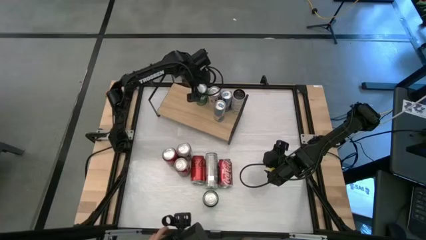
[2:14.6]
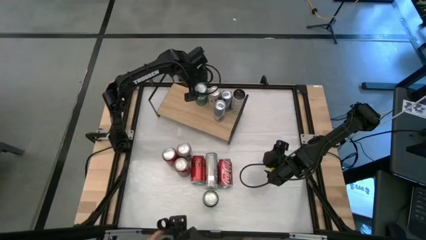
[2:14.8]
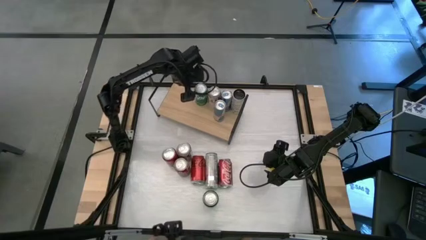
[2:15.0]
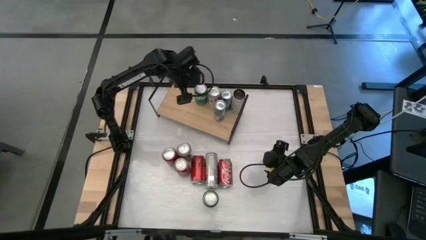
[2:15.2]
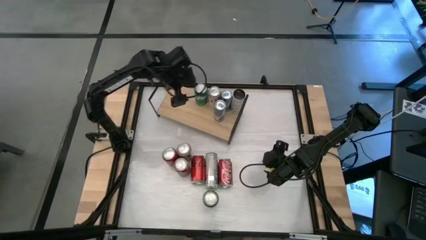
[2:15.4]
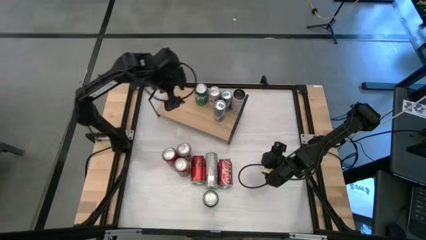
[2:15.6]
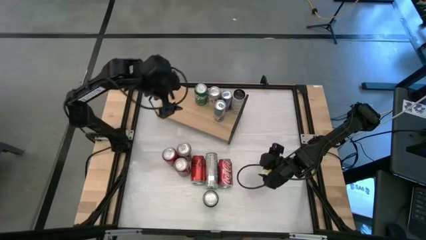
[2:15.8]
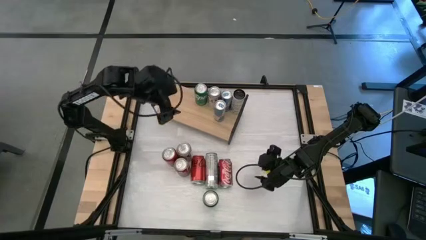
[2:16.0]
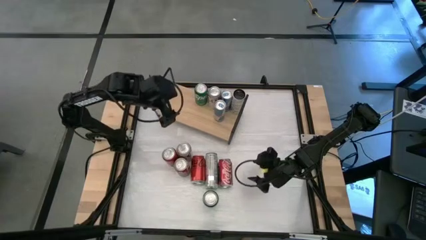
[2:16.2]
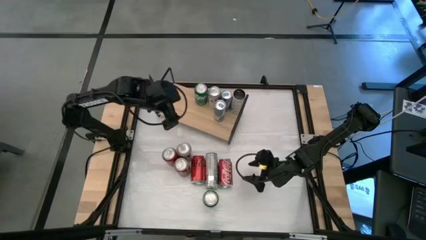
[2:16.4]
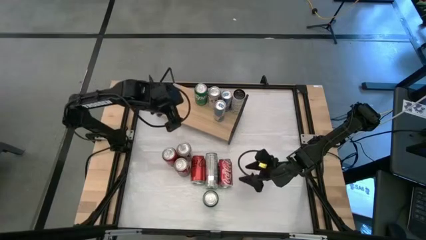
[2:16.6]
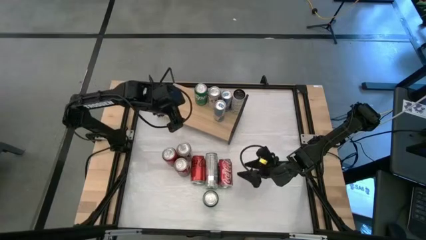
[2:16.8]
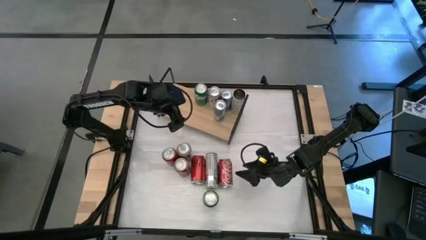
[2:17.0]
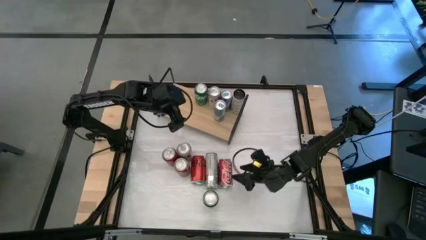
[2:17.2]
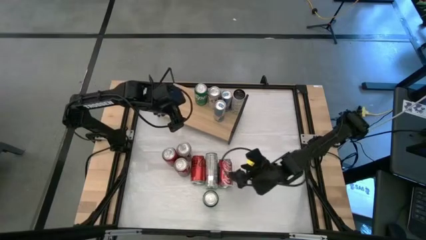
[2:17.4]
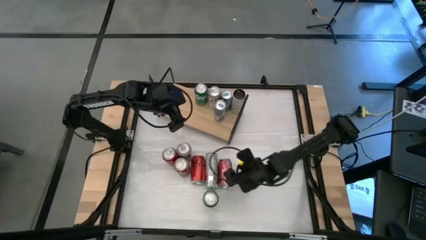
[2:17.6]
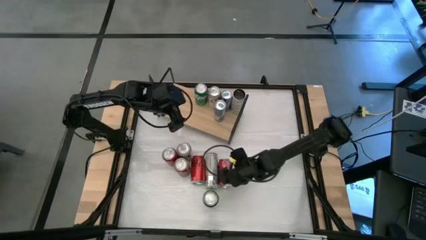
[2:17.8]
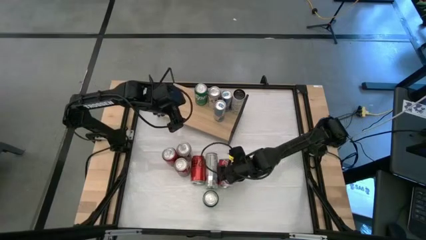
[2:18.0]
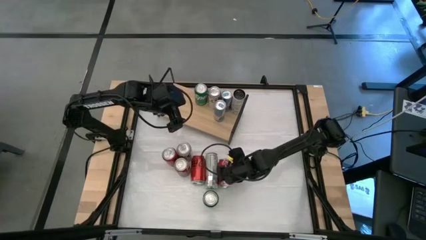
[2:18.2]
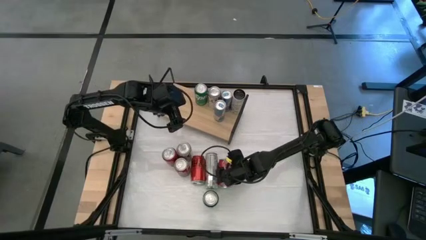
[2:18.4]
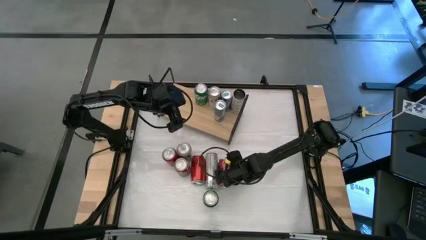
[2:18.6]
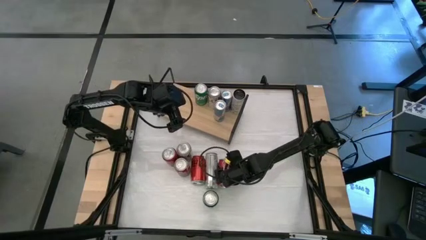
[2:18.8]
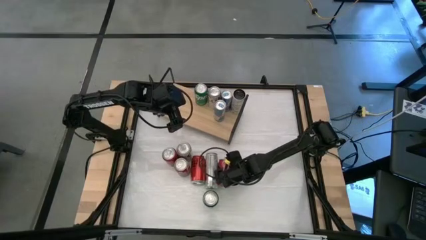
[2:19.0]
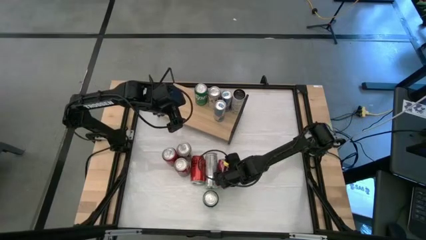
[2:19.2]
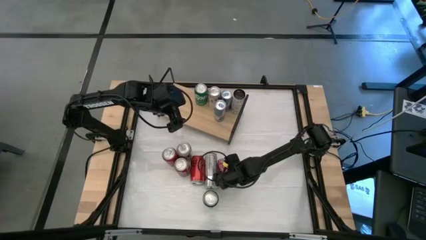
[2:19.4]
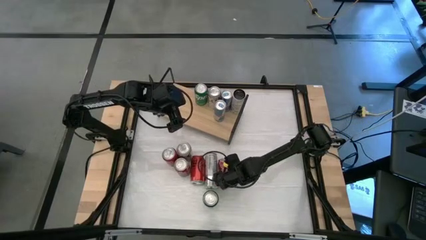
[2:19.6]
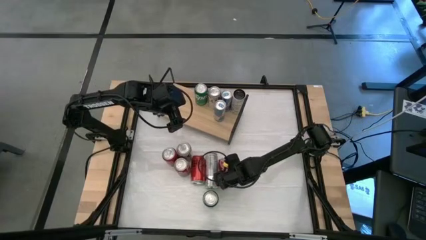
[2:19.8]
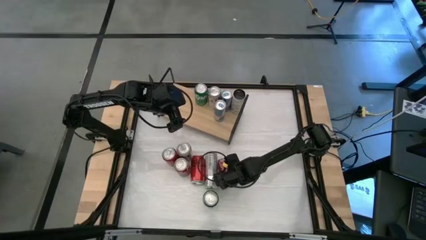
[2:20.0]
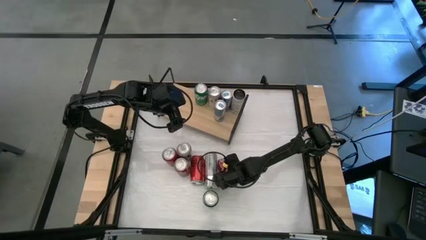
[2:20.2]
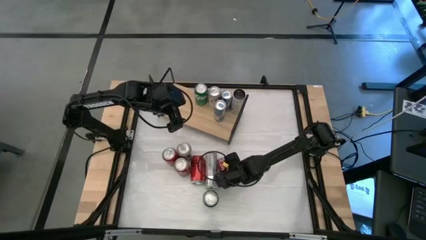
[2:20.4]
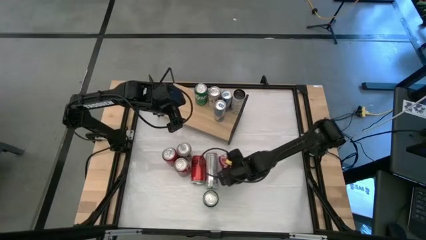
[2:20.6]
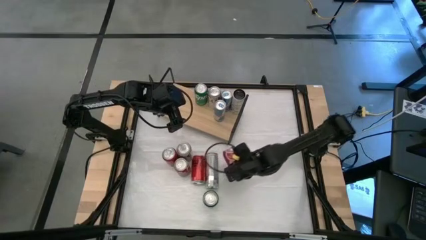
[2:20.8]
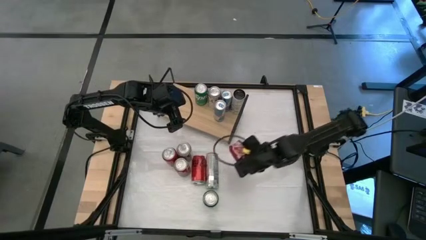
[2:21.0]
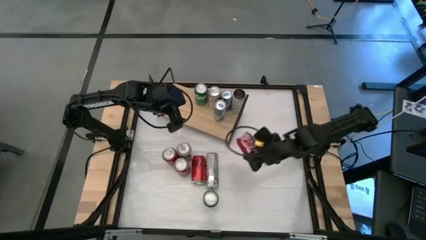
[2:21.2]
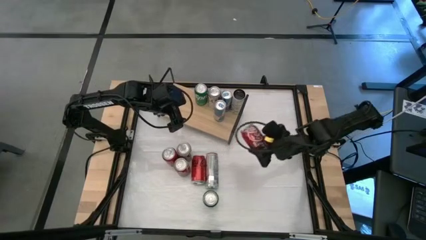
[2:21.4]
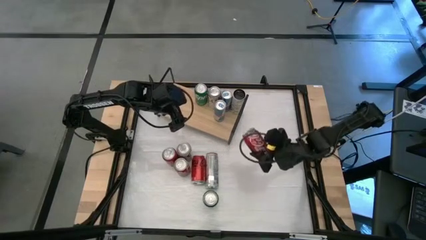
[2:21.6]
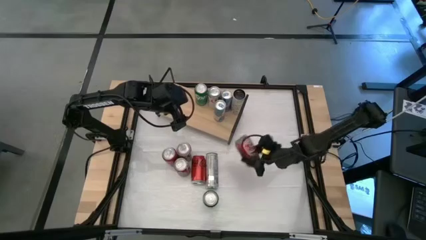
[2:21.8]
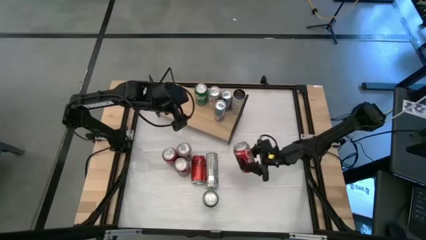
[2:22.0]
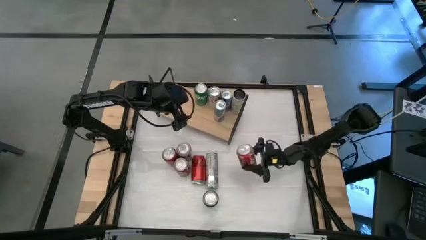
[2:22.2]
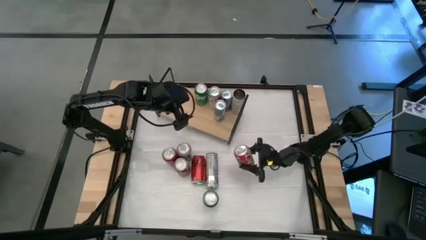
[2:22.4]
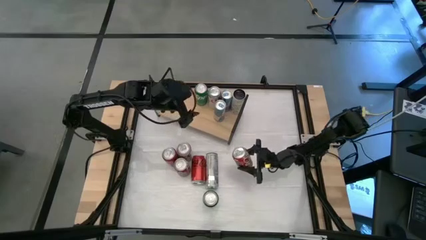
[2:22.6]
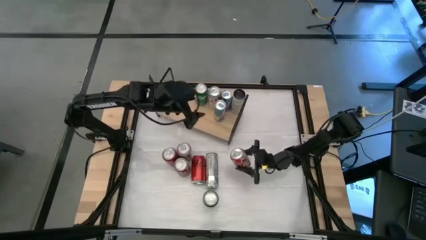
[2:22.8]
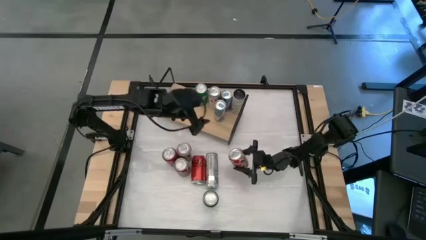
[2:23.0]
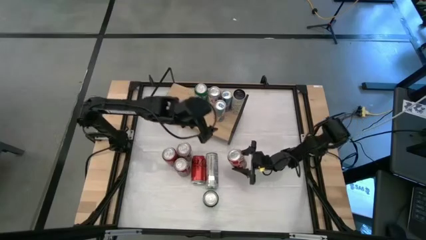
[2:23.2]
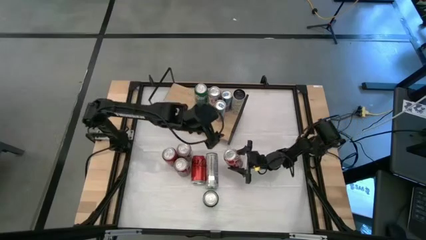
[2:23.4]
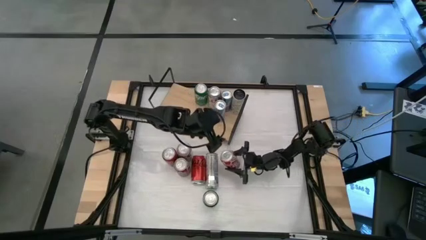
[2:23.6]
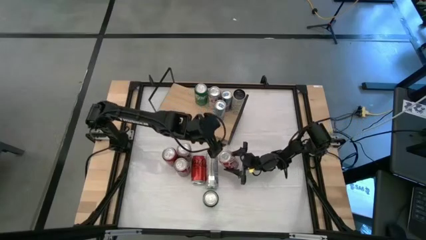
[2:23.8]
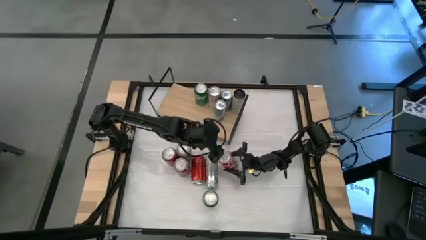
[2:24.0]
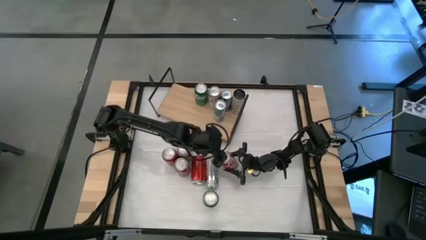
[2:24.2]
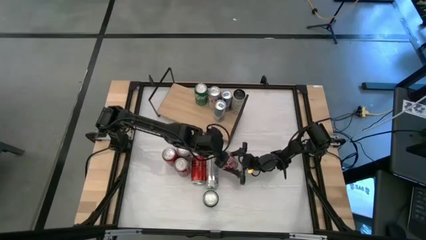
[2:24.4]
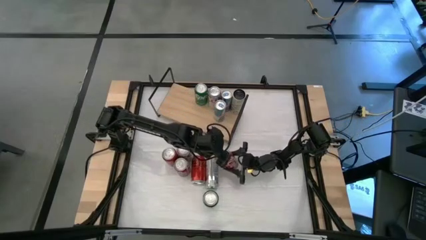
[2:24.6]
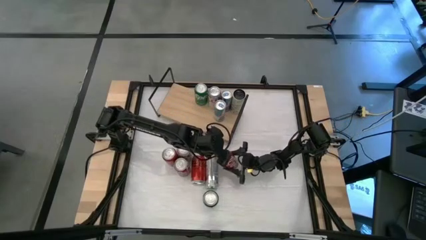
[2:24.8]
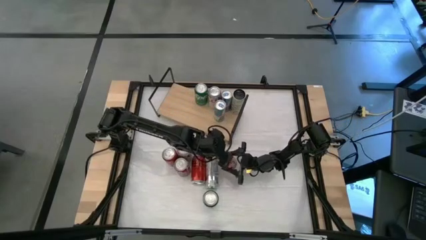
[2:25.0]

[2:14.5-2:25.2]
Task: Place canned beverage on shelf
Put the right red white soda can on the shelf

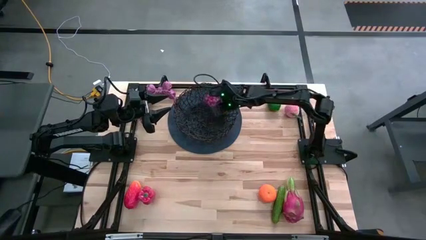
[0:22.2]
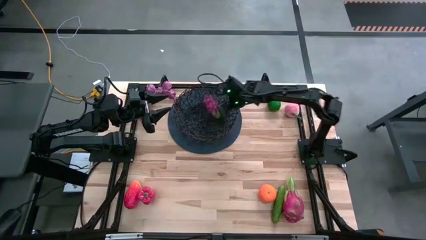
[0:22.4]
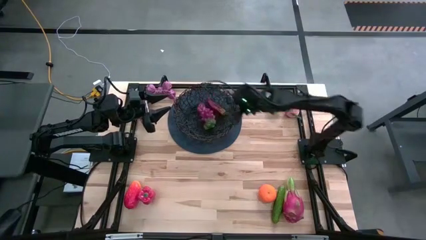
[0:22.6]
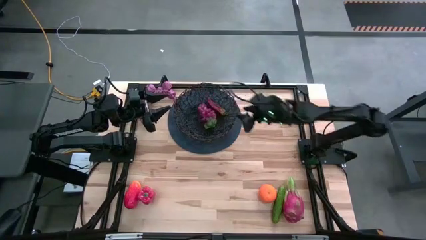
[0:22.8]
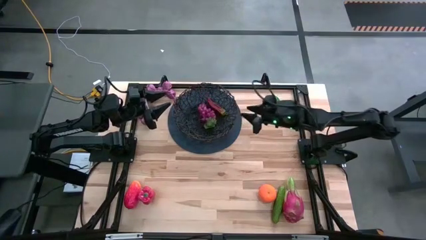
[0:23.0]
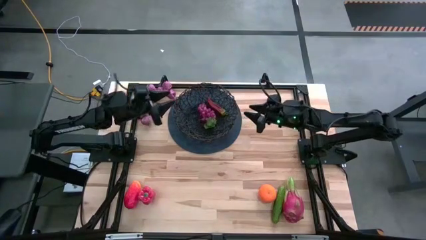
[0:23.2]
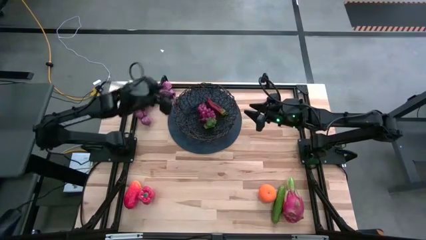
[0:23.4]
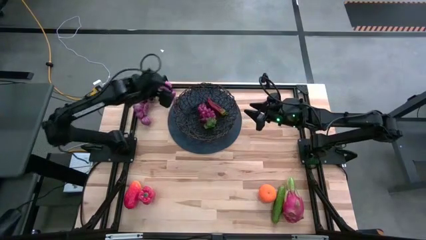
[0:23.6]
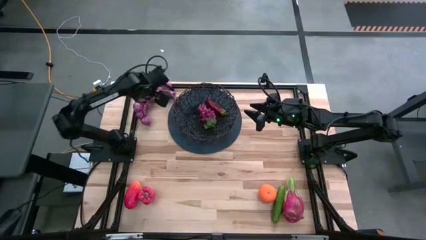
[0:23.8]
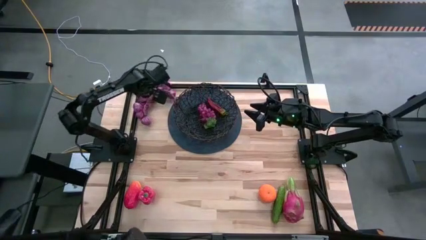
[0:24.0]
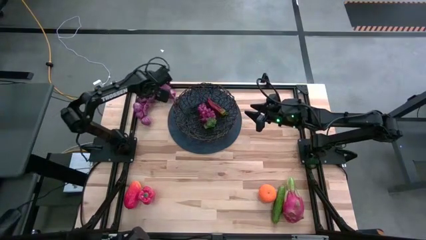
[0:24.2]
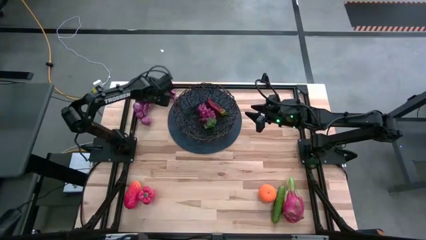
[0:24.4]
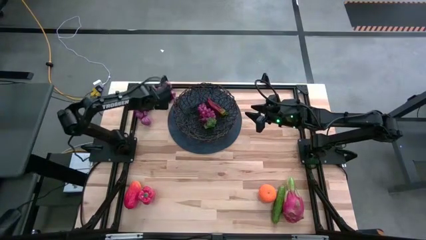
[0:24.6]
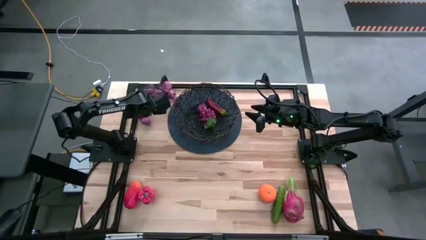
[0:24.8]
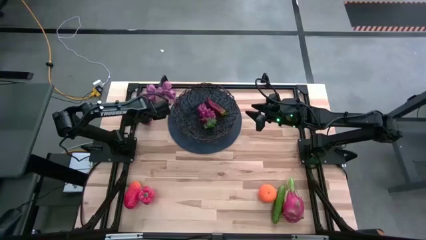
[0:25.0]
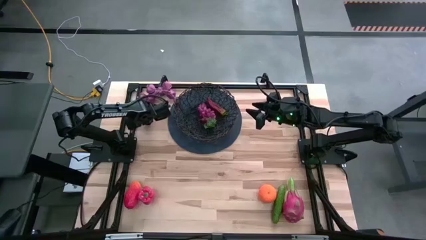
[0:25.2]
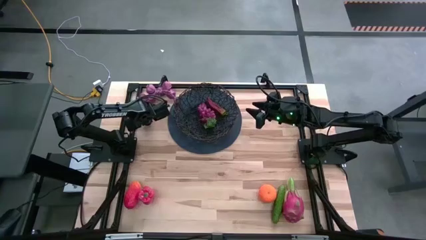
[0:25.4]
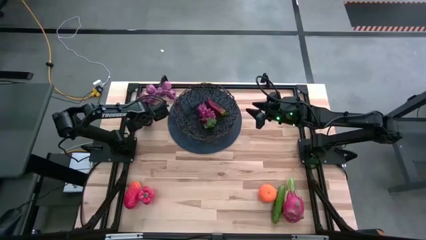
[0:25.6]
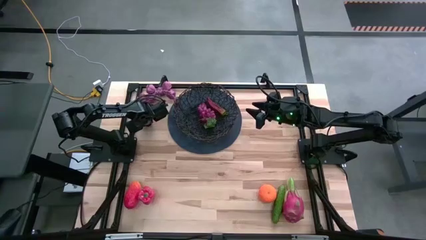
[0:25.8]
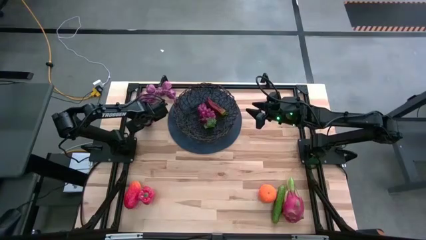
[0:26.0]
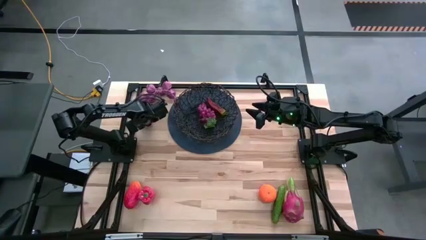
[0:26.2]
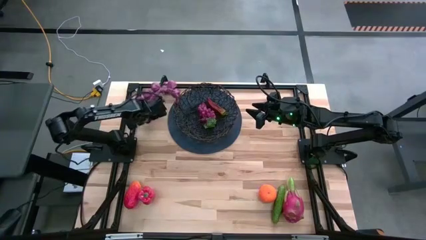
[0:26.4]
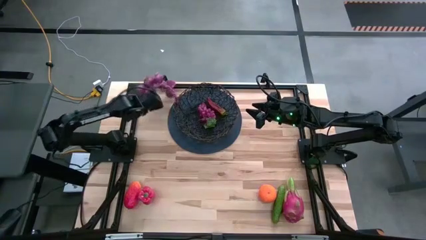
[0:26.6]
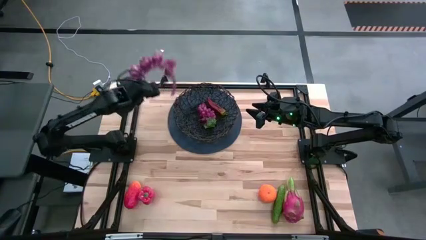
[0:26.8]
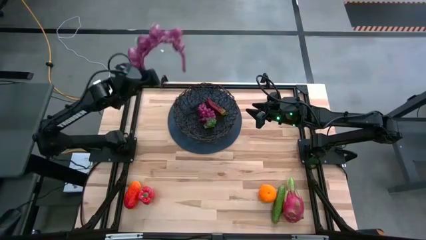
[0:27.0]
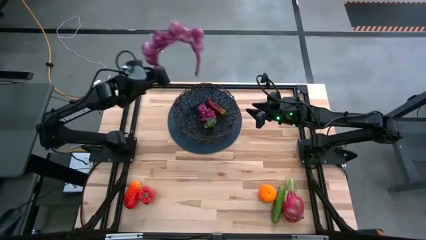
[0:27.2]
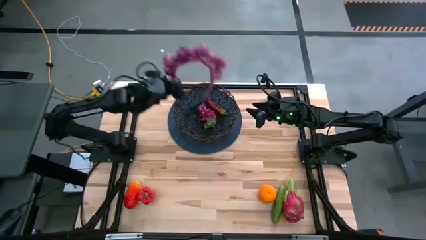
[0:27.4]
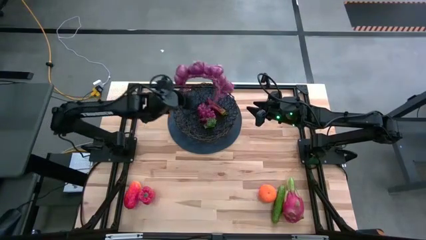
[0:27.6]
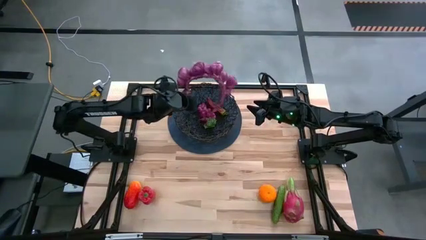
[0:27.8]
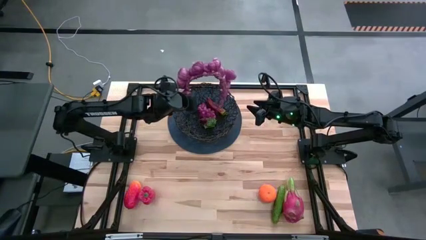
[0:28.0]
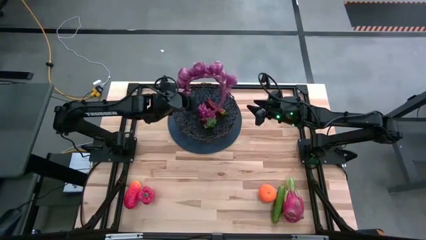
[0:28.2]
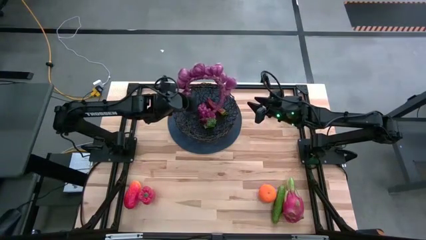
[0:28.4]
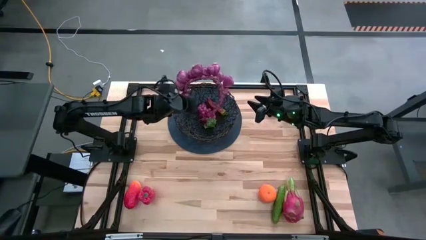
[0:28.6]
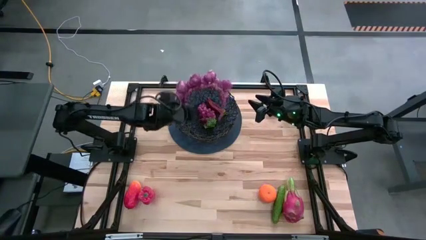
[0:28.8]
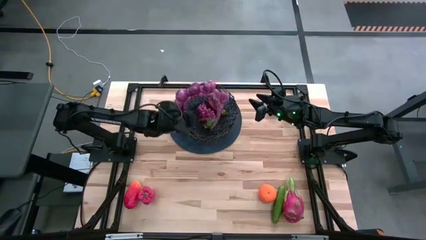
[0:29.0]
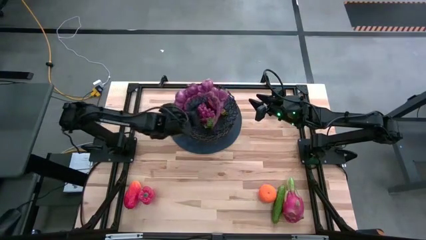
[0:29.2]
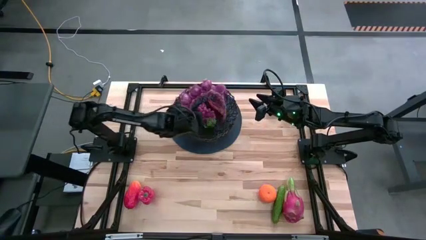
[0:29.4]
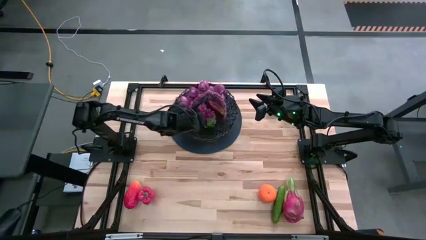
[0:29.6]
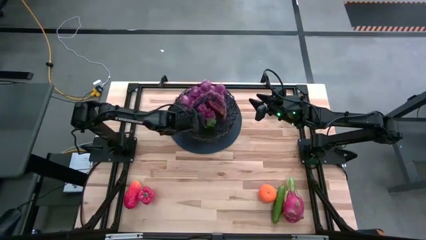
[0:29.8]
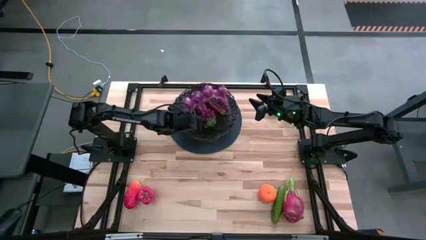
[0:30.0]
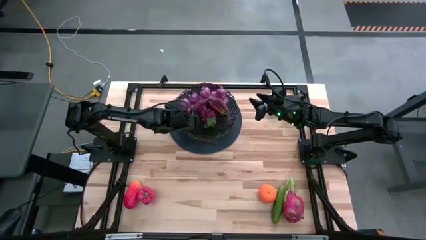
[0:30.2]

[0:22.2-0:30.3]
Task: Build produce basket
Put the purple garlic into the wire basket
